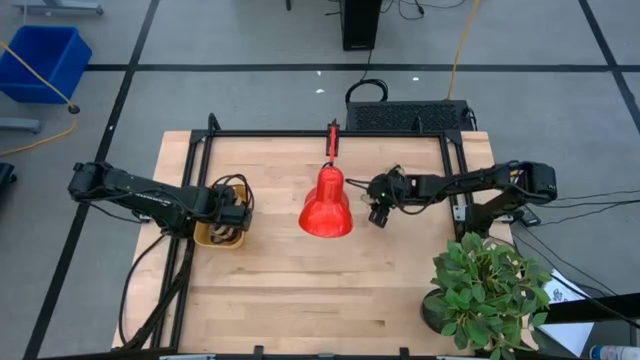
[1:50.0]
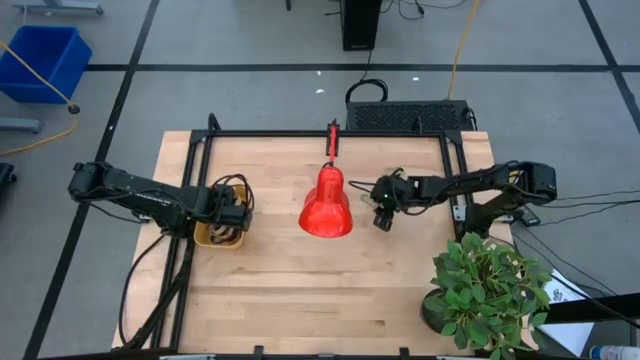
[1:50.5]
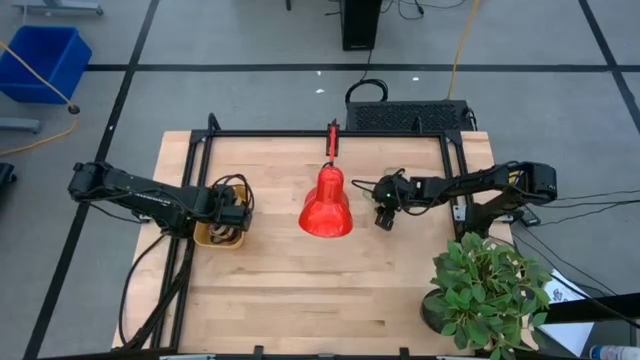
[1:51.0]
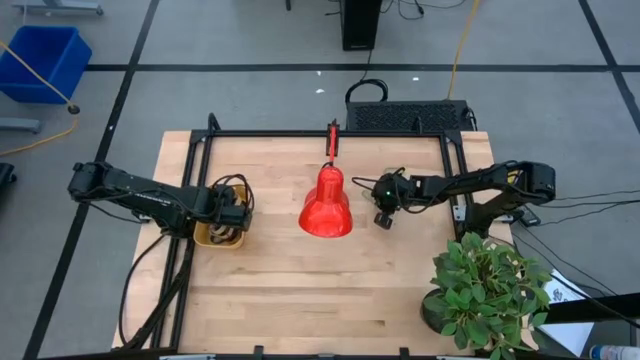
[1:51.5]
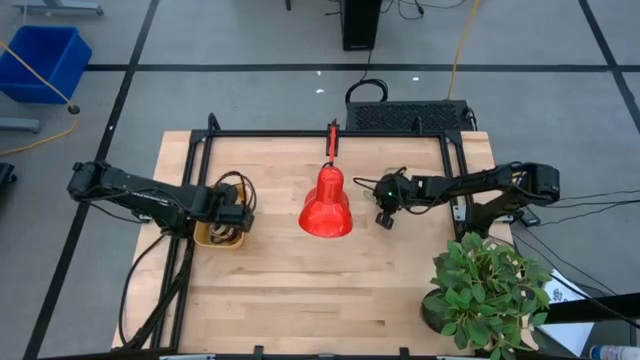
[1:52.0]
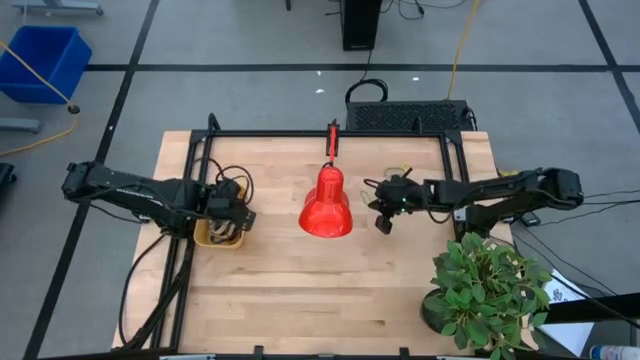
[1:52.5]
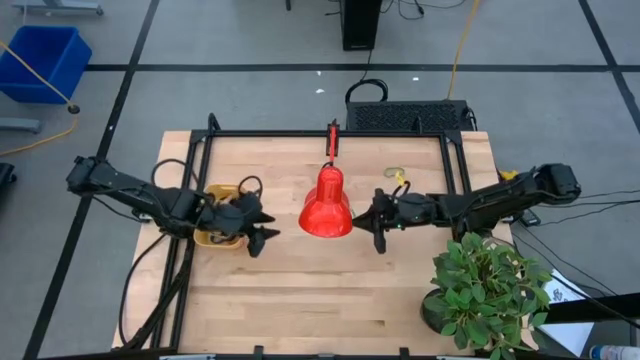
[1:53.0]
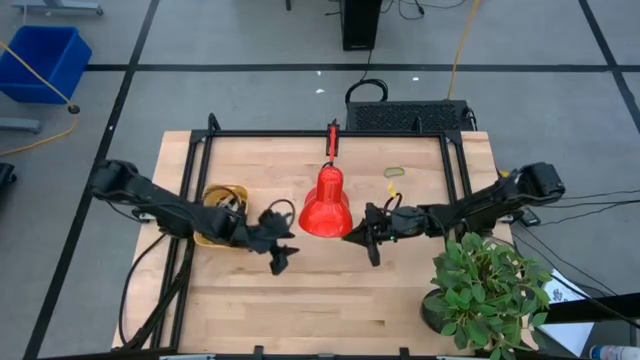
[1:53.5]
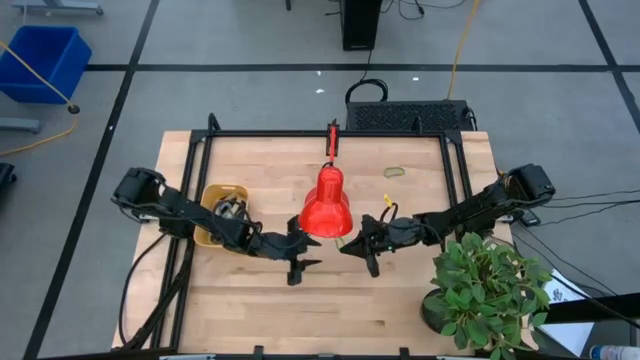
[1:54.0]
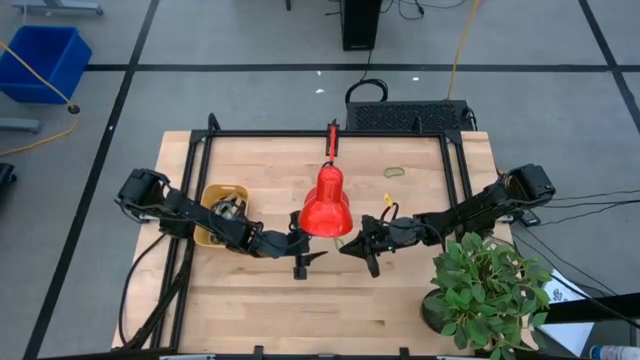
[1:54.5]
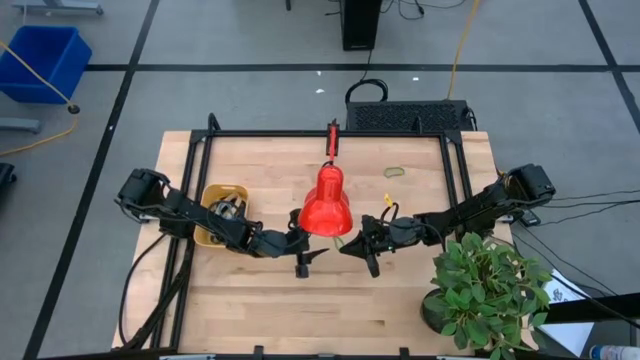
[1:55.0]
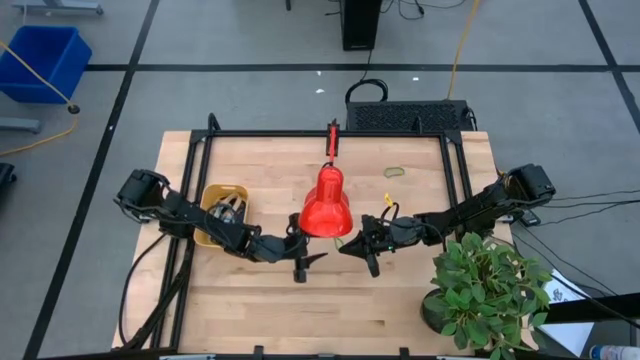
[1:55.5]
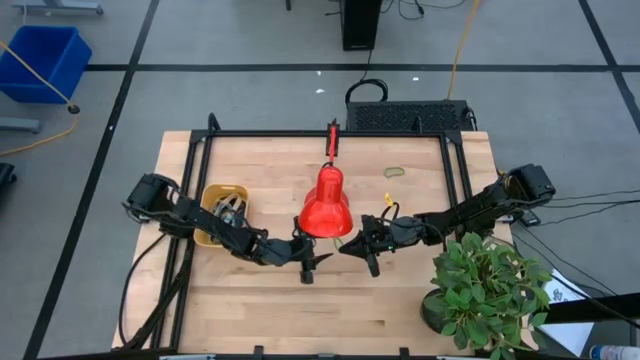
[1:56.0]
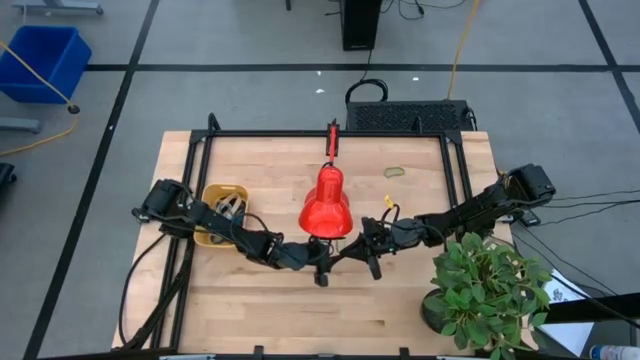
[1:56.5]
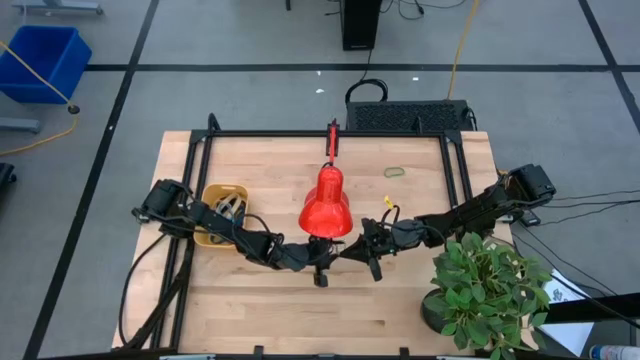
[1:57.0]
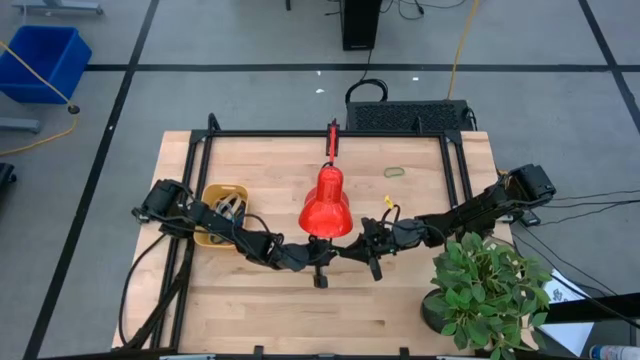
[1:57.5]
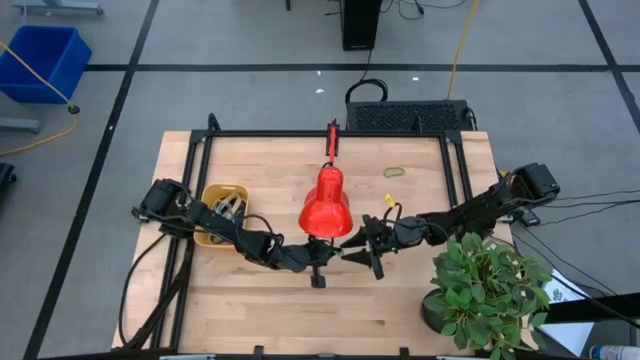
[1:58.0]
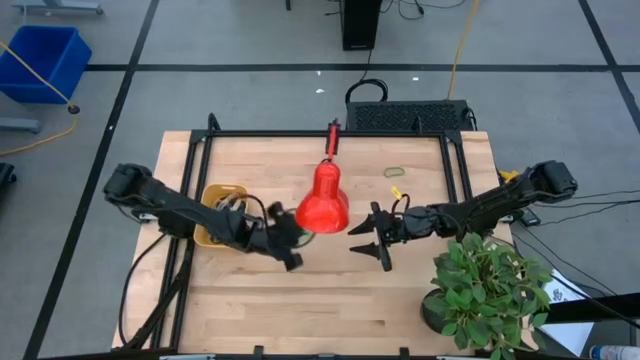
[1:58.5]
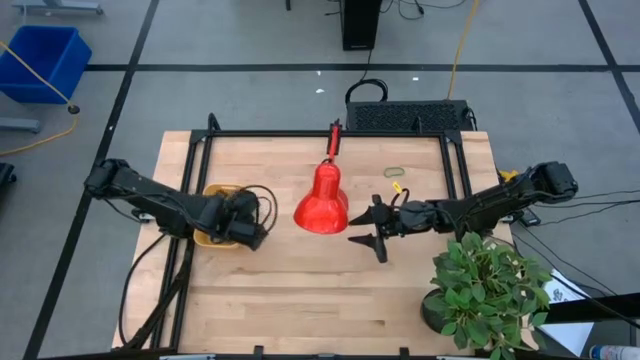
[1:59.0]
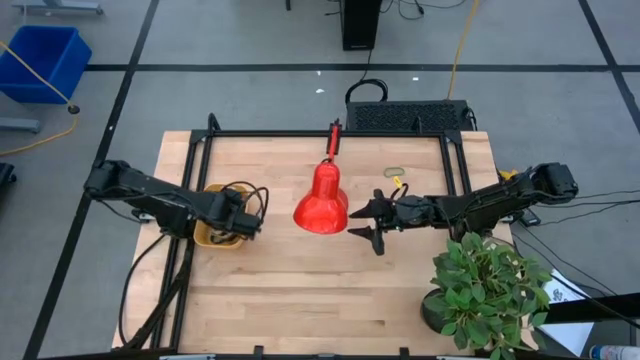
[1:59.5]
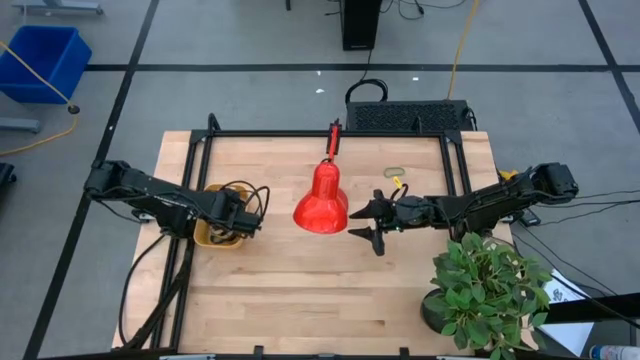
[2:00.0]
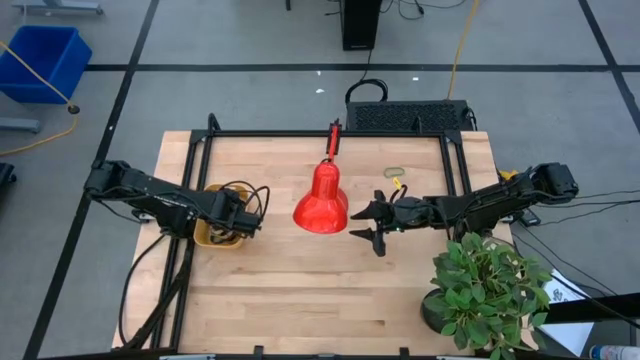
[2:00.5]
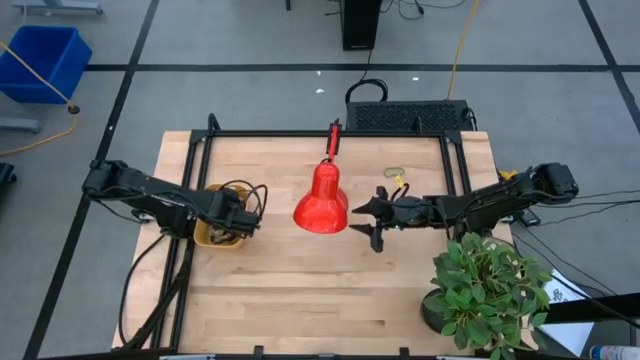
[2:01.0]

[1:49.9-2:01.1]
Task: Pick and place rubber bands into bin
Put the bottom green rubber band into the yellow bin

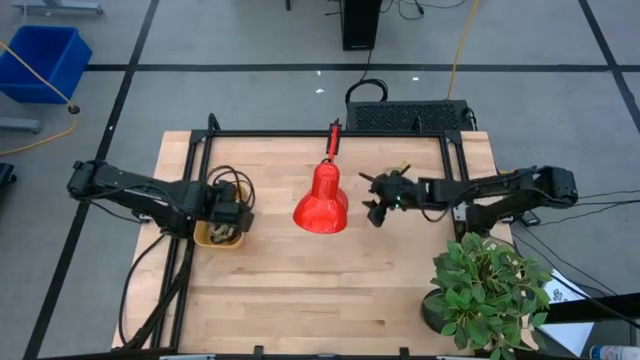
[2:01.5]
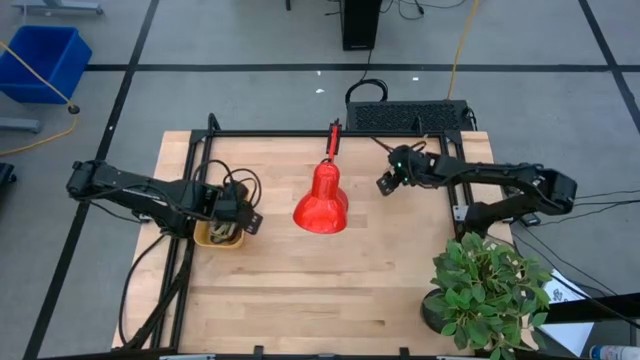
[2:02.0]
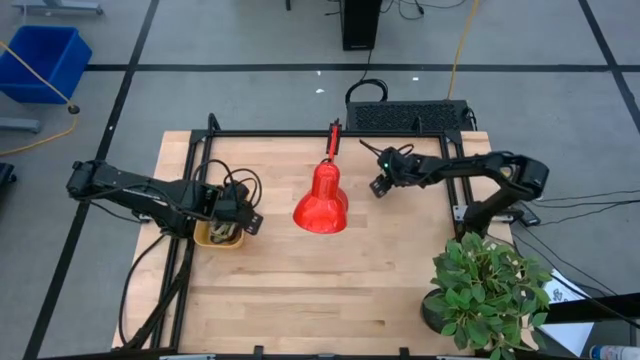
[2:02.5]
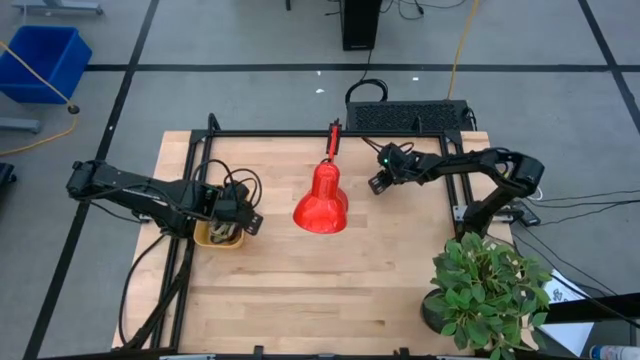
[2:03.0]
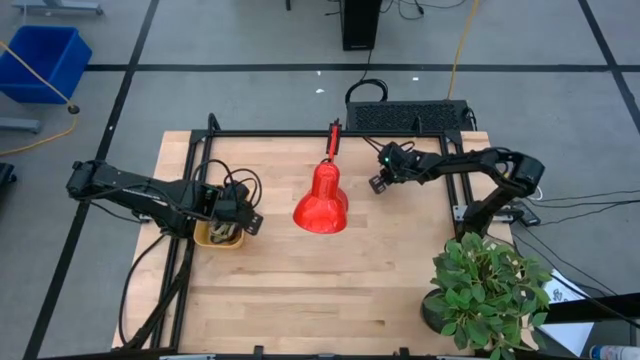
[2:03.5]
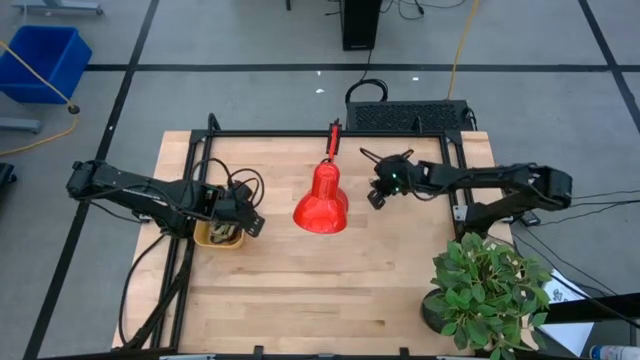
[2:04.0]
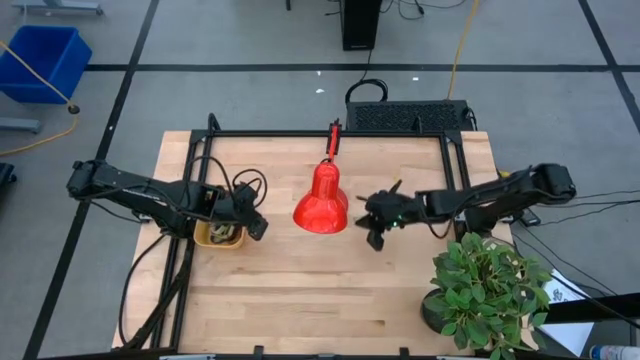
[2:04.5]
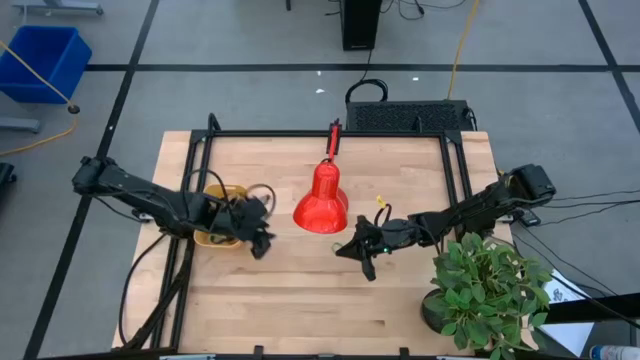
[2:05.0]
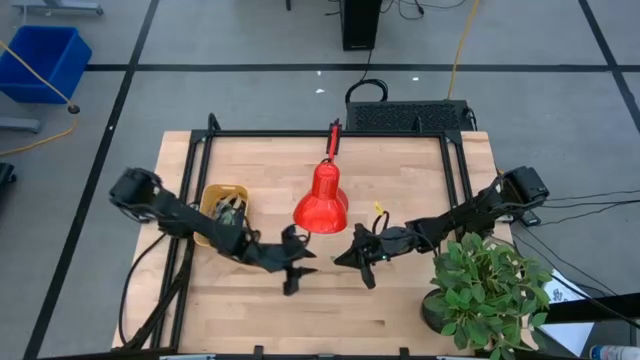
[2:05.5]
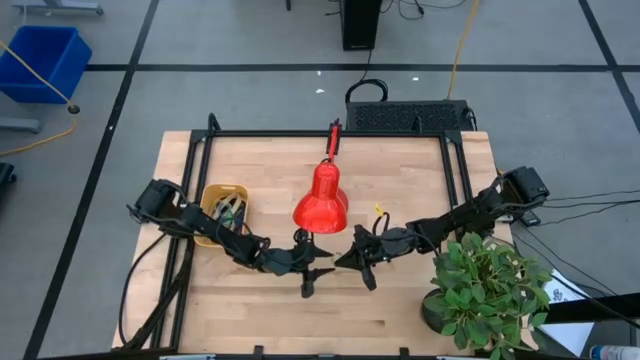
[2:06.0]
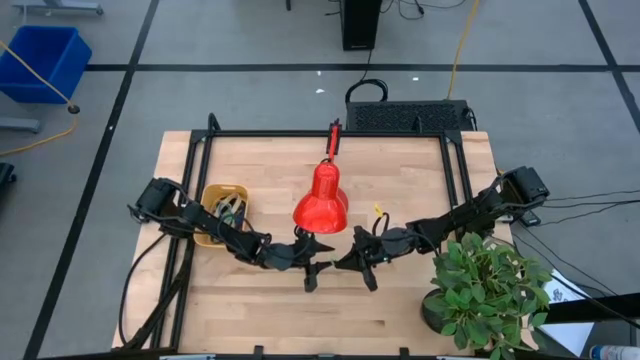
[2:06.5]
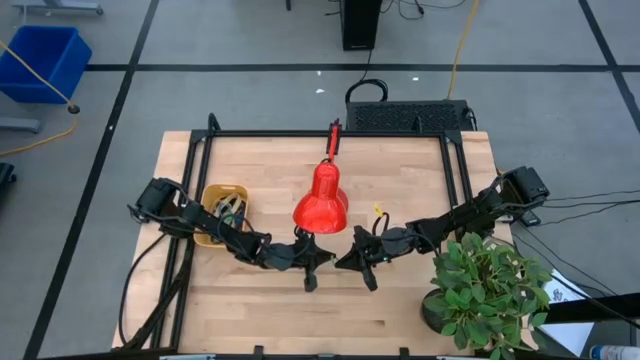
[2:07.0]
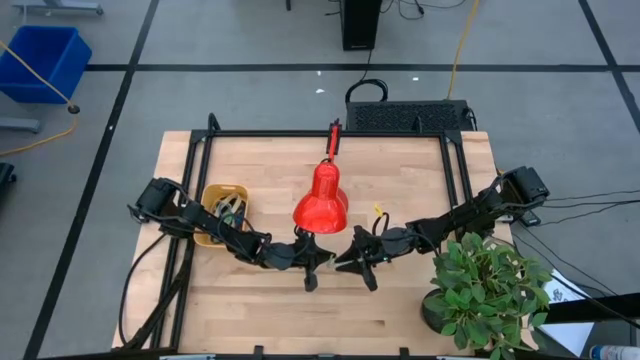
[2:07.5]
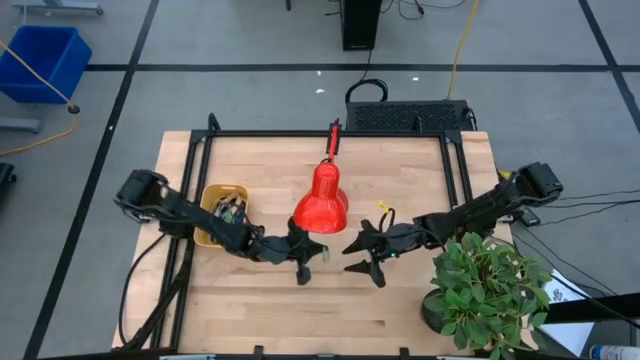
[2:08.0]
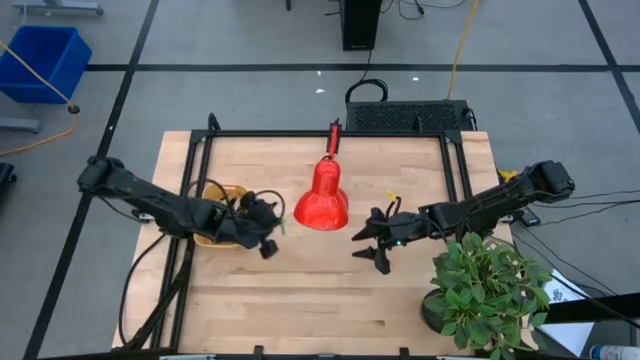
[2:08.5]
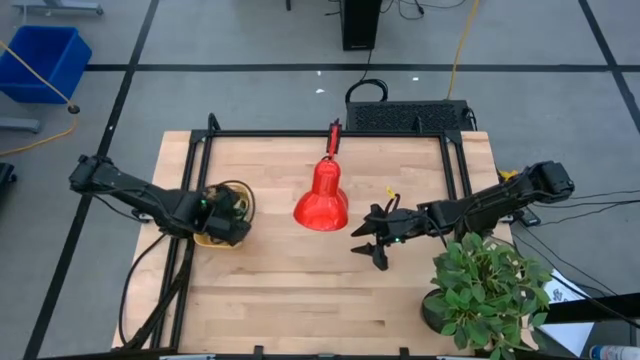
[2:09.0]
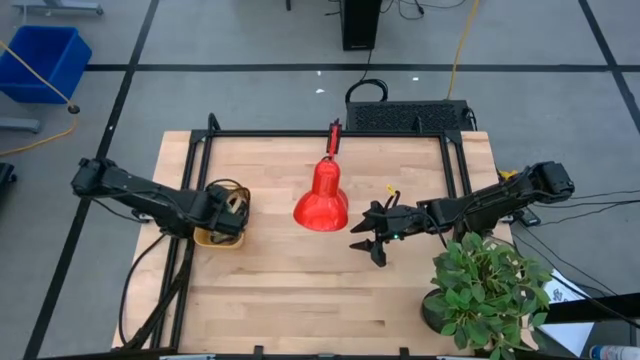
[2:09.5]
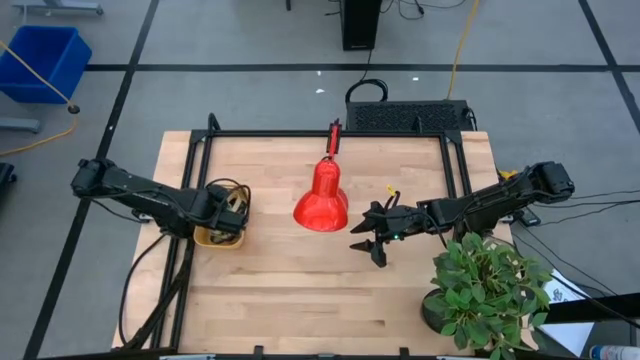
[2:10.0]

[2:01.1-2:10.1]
Put the green rubber band into the yellow bin

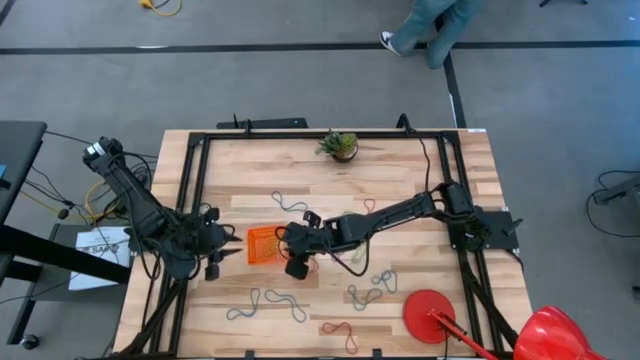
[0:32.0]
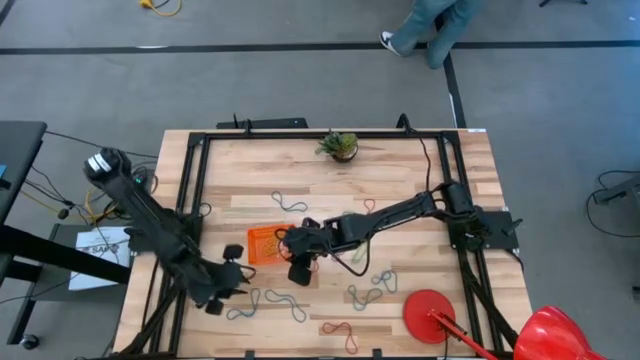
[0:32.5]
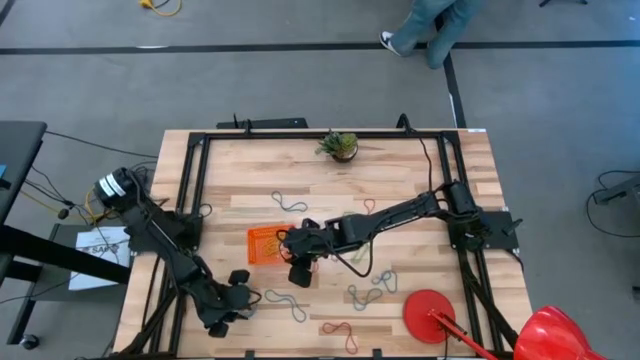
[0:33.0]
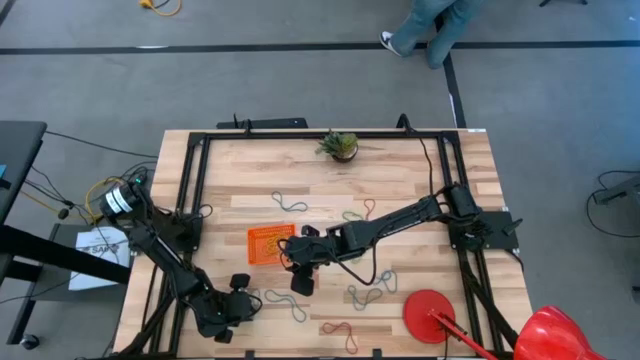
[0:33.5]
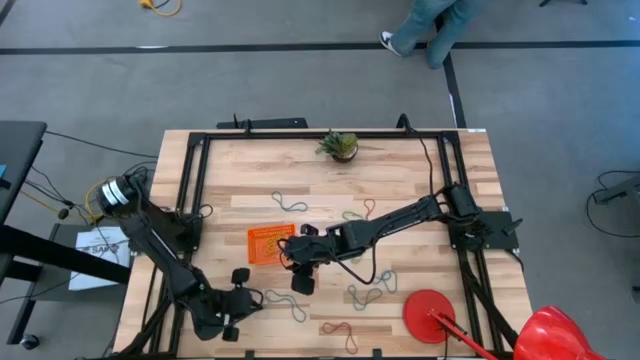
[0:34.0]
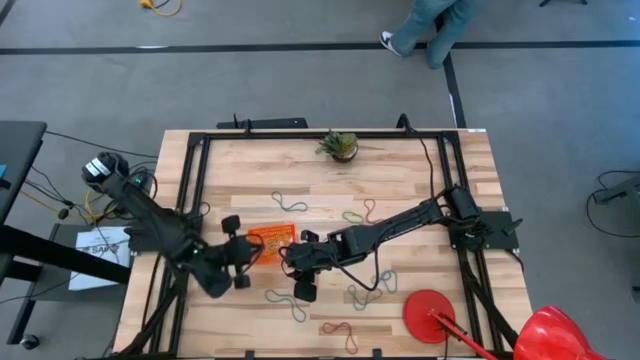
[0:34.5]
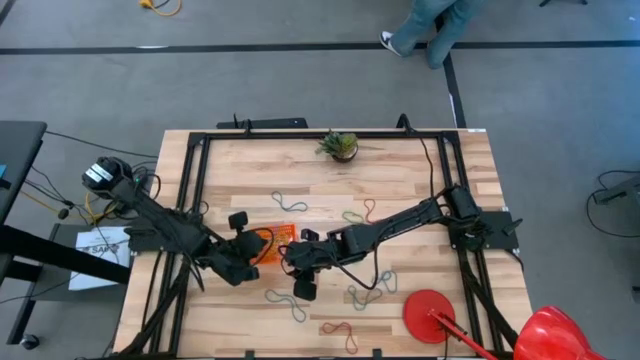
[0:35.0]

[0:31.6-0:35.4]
Task: Pick and place rubber bands into bin
Put the blue rubber band into the orange container
